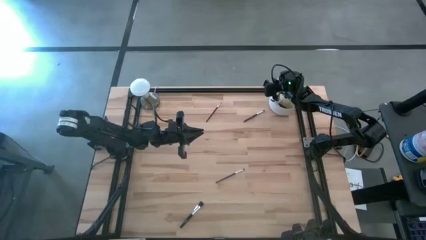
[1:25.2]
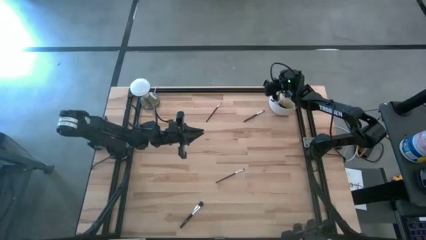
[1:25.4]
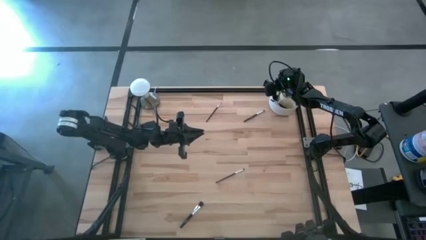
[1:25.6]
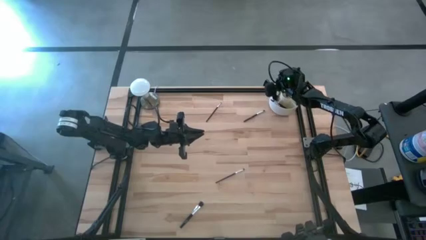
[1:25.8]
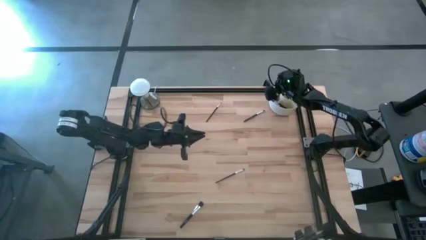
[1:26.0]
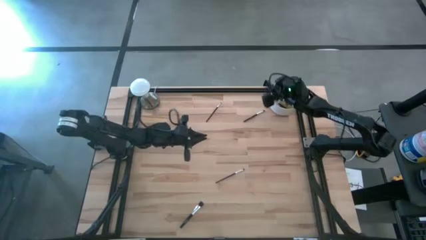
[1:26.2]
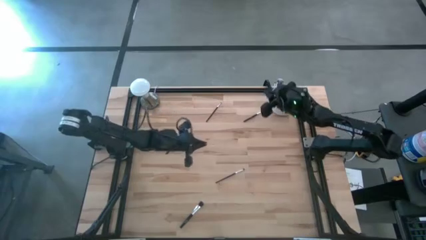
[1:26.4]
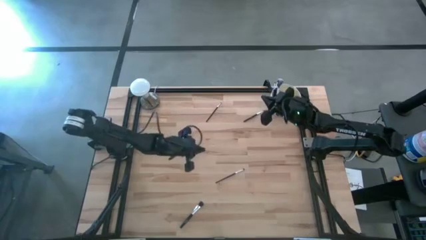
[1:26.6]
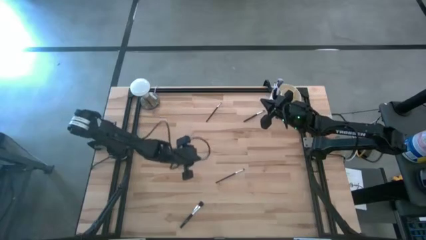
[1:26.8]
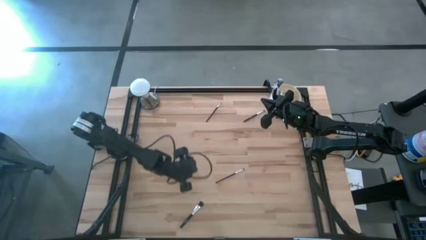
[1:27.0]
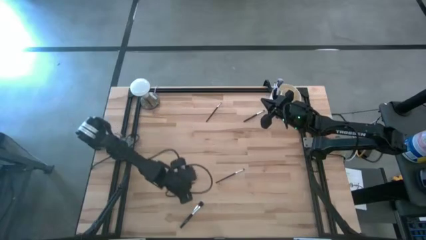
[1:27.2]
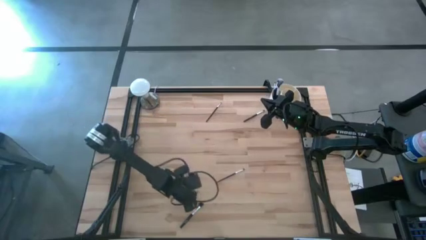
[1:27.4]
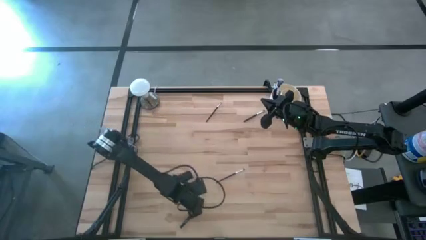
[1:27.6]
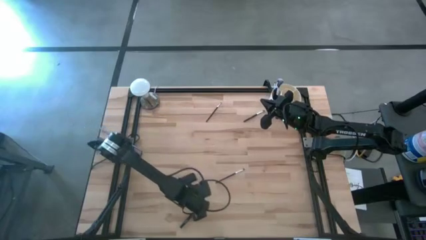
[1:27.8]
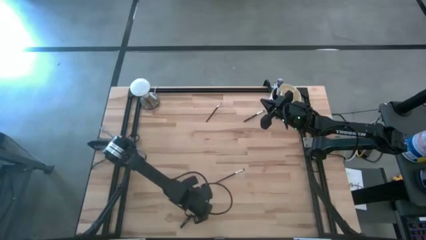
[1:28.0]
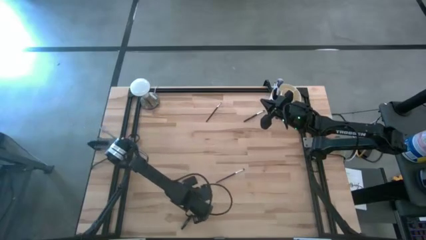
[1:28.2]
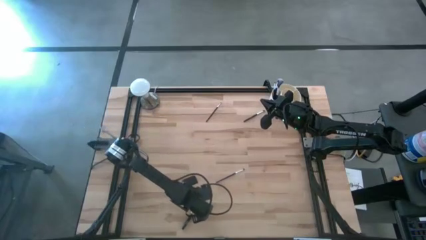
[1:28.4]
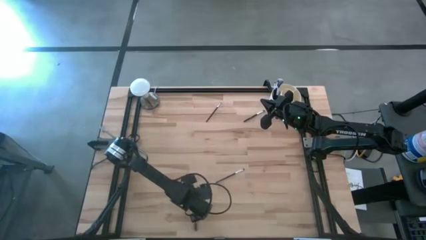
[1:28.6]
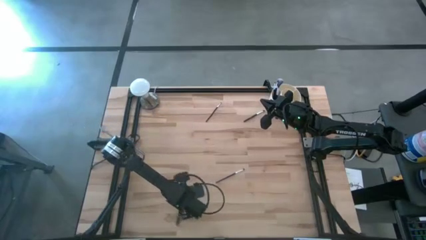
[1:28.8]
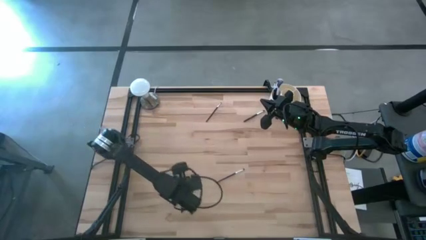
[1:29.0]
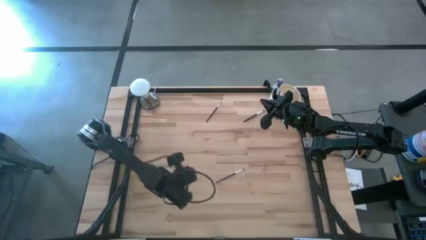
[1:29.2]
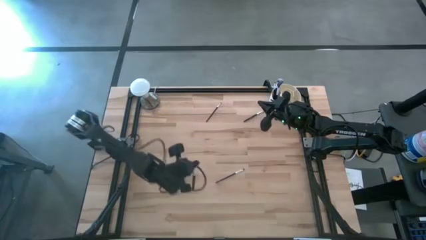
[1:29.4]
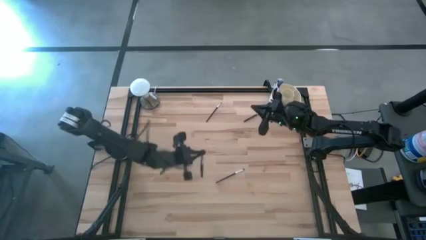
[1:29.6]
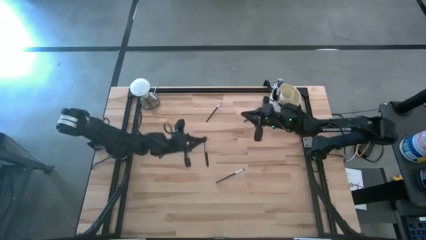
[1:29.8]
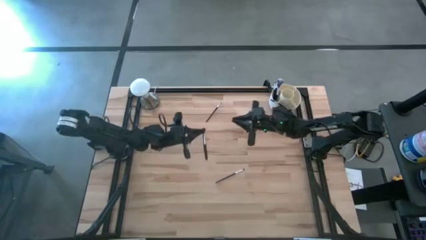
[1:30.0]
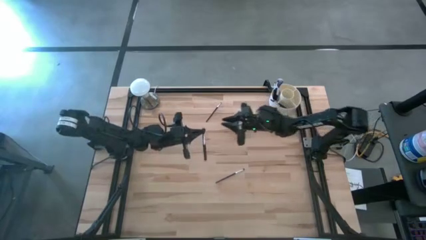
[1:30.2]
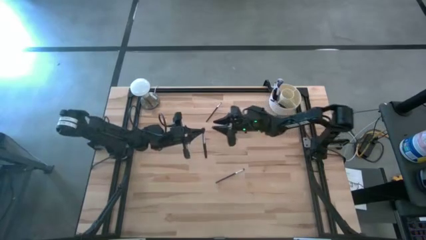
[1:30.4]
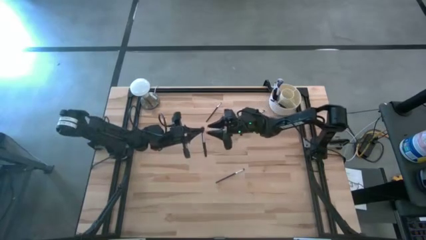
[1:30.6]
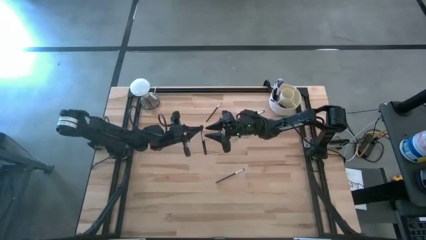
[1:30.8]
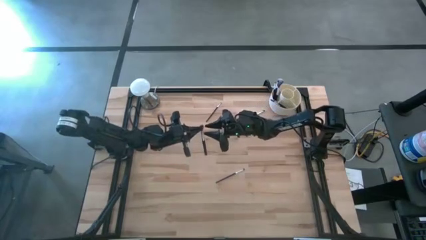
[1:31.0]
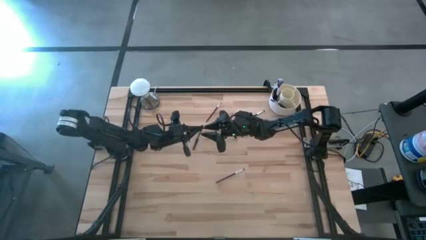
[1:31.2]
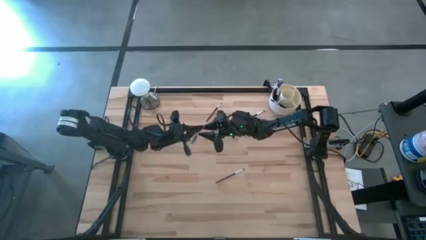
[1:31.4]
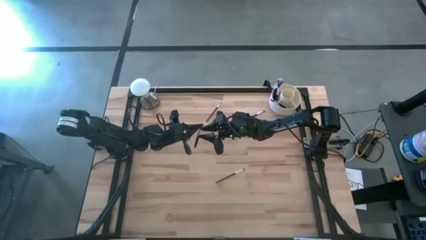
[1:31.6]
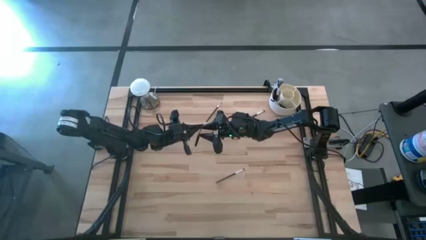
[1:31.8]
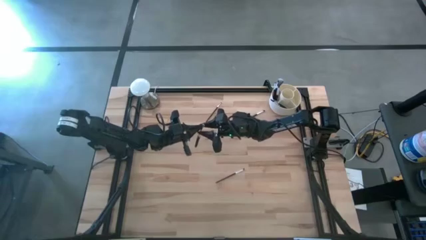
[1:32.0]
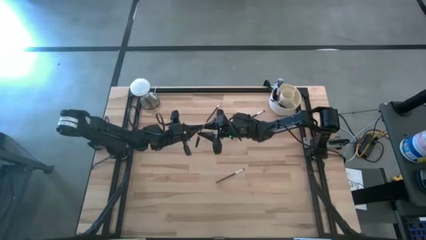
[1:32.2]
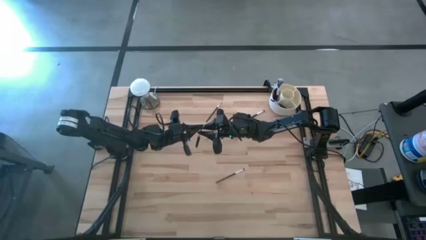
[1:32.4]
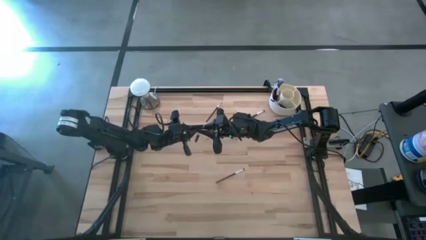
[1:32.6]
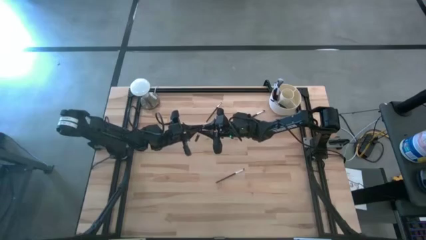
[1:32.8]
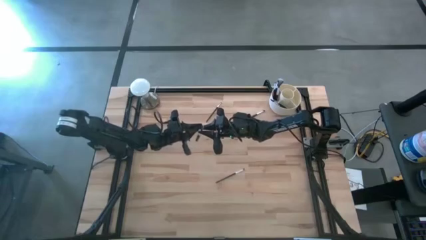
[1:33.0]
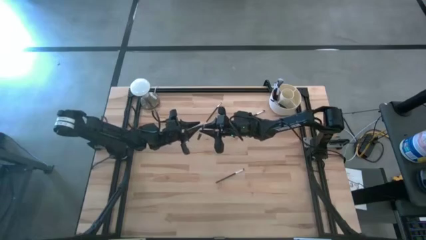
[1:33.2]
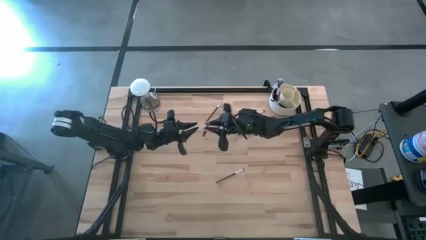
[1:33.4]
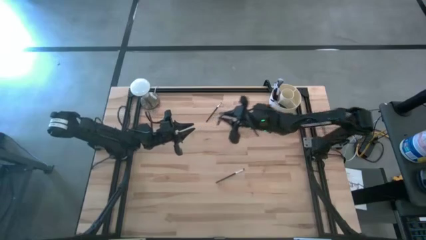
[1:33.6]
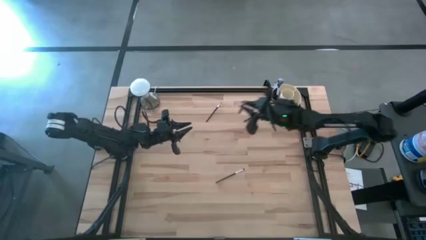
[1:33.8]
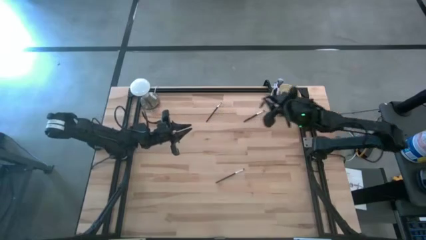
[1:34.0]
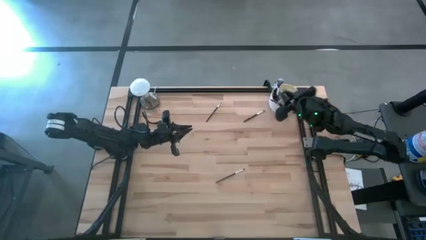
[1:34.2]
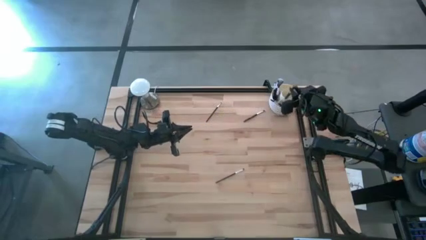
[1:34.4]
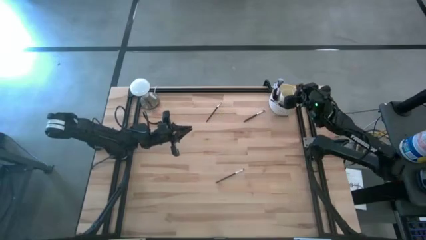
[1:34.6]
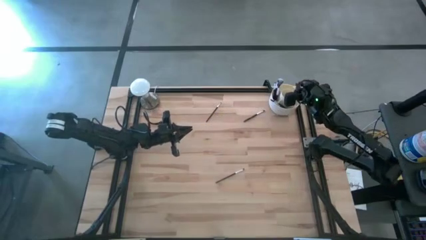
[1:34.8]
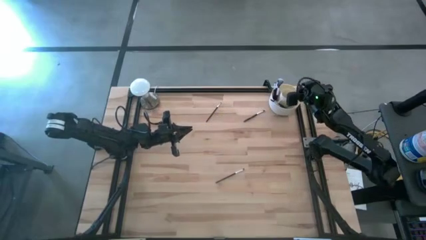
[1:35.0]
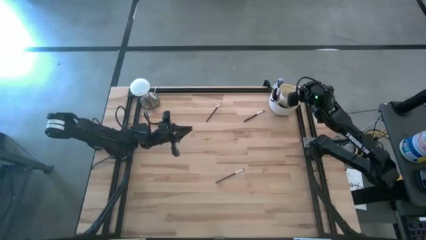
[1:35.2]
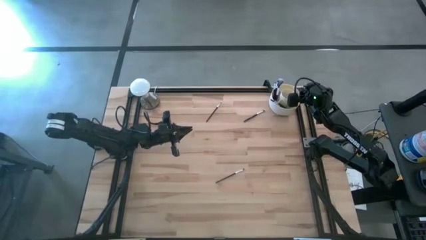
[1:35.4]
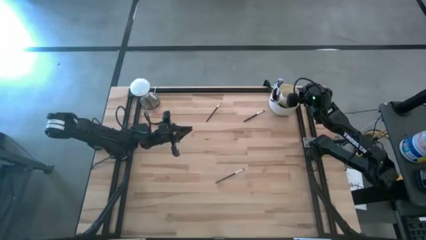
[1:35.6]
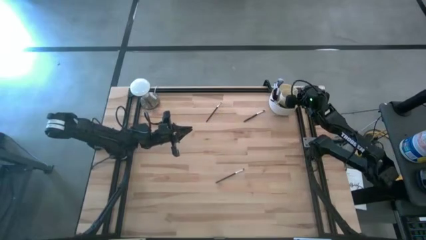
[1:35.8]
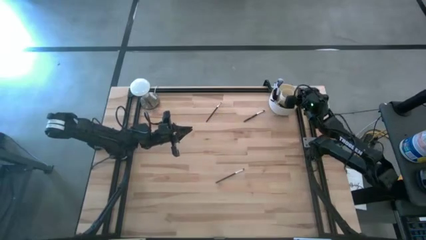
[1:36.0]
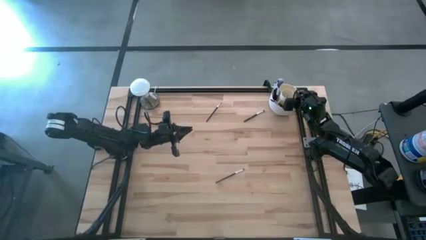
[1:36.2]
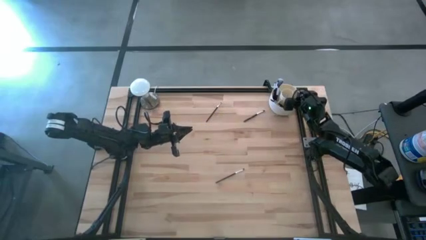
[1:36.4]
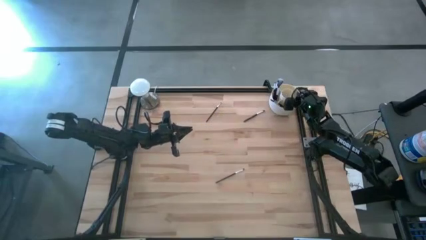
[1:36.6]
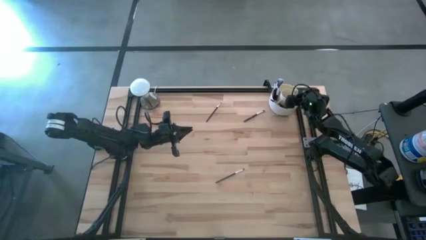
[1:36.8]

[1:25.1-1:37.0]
Task: Put items in baskets/containers
Put the black powder brush into the white organizer

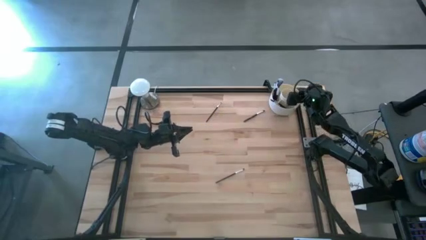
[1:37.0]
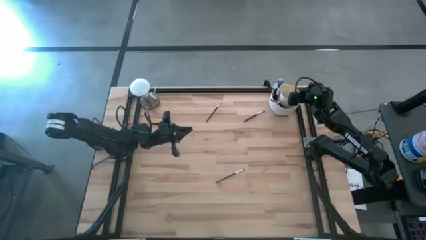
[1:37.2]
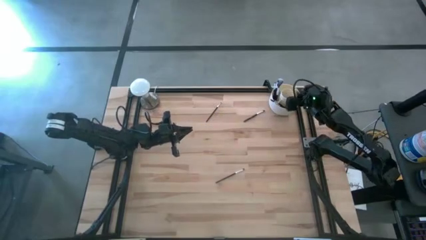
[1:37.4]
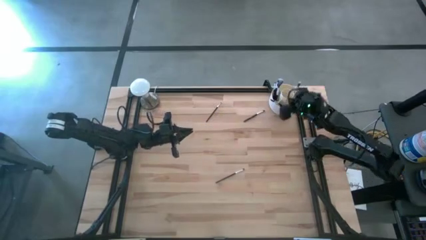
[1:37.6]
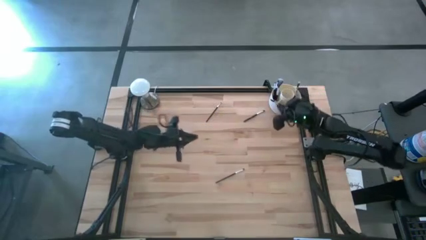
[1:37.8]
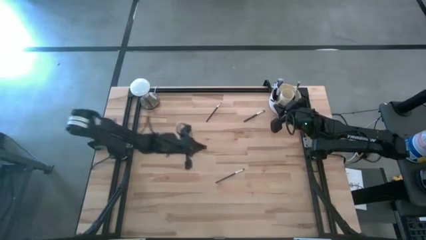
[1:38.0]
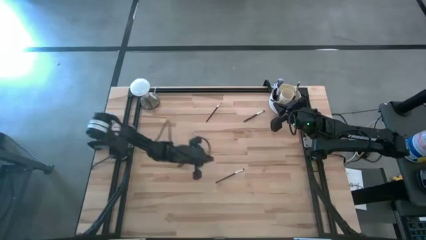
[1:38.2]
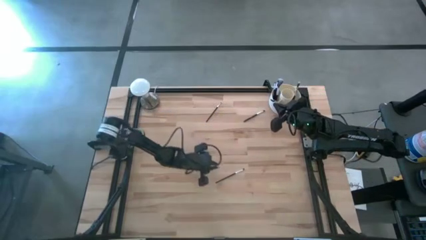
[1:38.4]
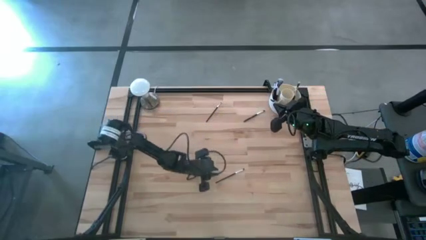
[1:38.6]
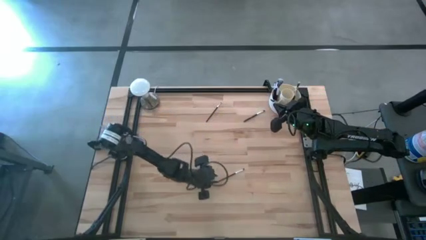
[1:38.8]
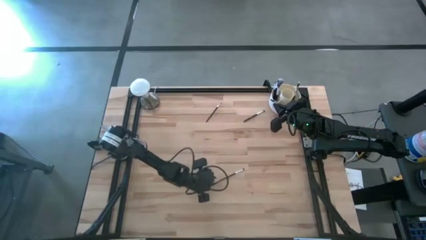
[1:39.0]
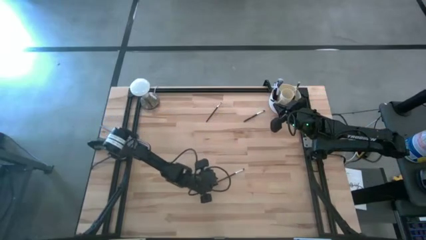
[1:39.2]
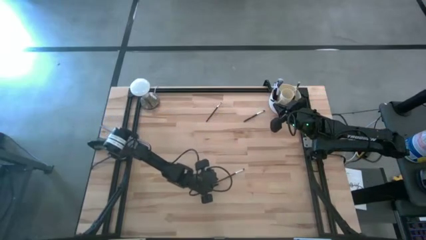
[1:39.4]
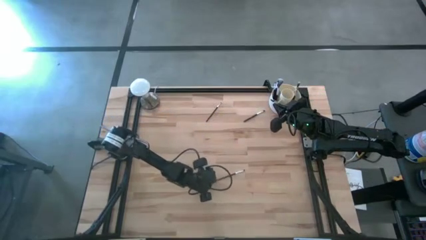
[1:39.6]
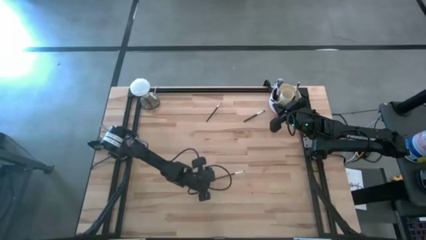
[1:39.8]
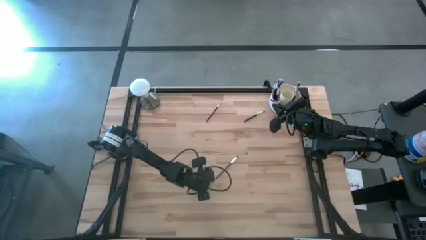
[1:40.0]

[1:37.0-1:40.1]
Put the black eyeshadow brush into the white organizer

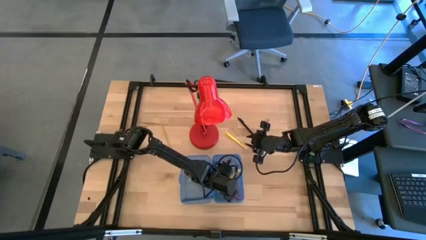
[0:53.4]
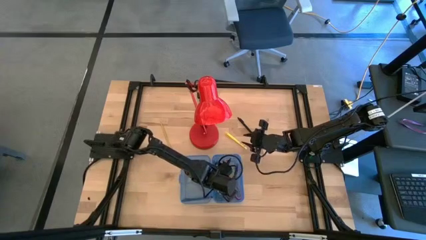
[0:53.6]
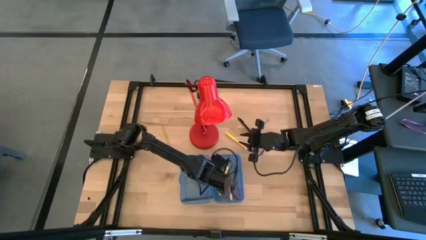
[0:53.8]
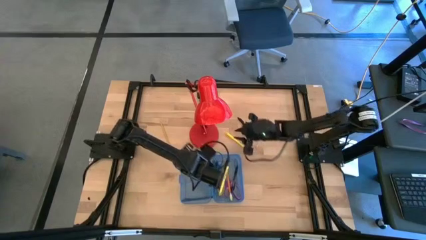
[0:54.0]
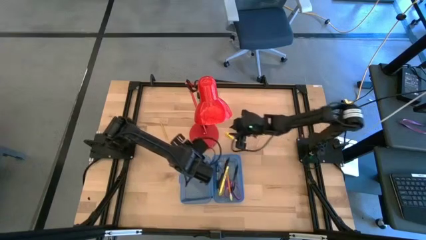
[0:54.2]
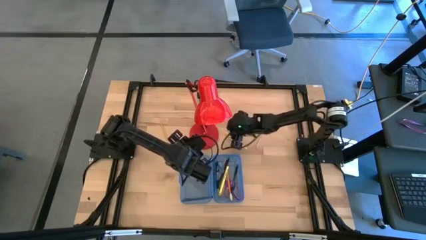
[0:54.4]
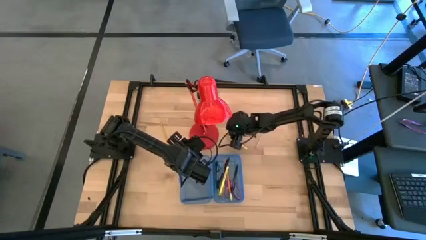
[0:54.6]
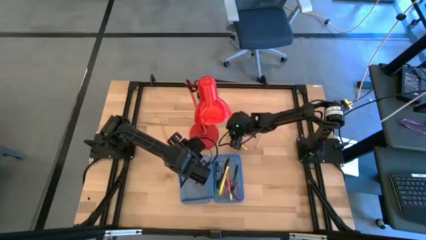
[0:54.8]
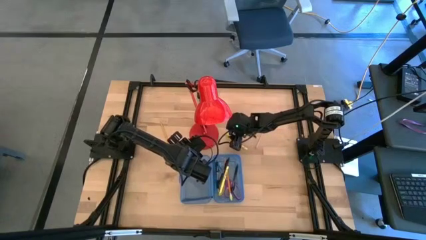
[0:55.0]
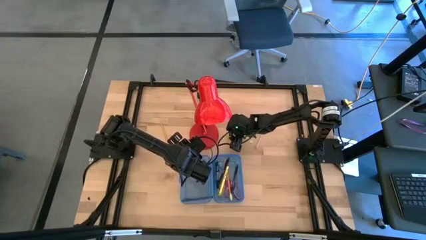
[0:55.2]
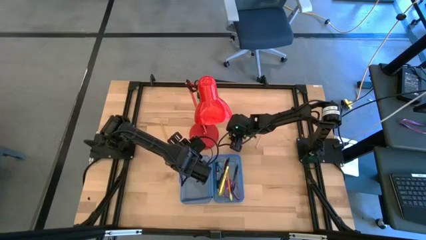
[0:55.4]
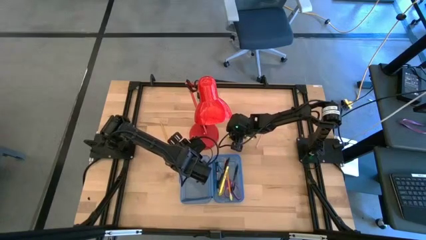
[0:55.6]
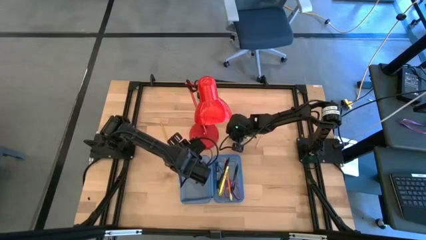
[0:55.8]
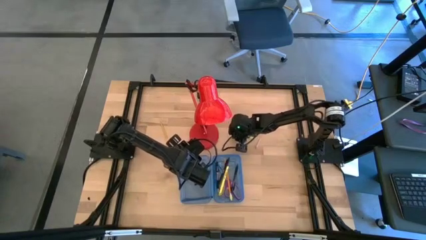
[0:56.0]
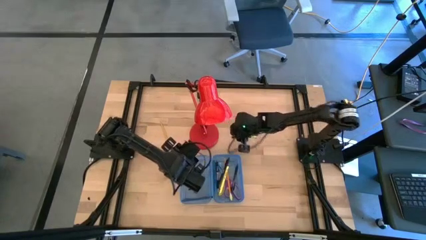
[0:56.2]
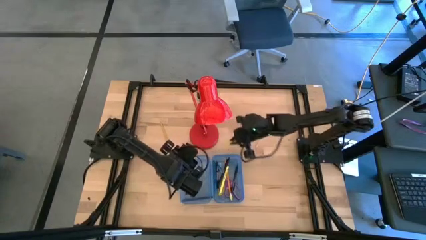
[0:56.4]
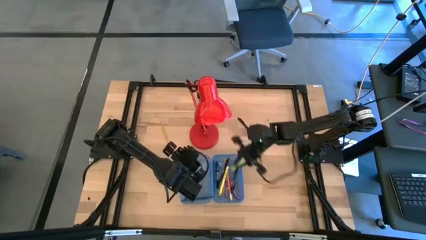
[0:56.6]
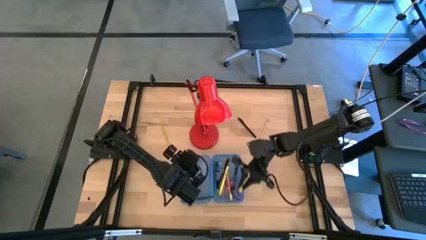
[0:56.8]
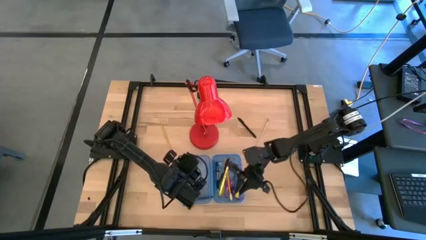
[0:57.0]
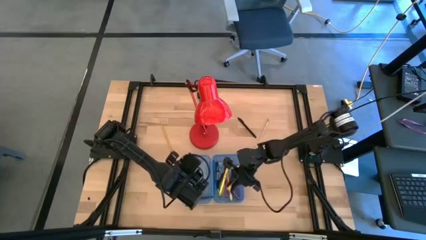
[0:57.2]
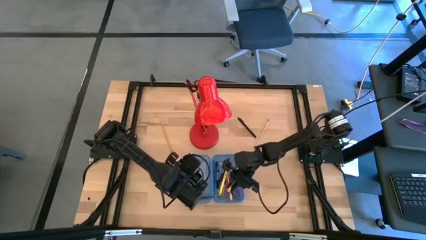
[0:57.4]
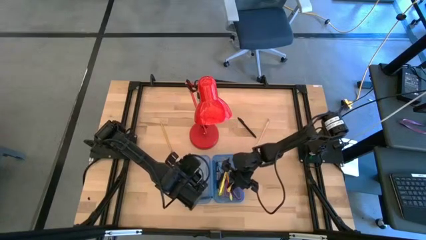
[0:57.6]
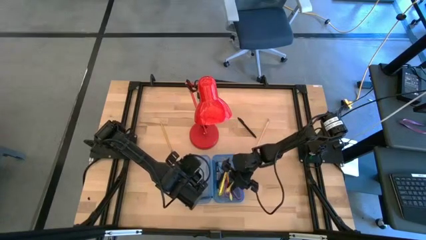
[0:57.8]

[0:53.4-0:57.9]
Task: Pick & place school supplies into a supply box
Put the yellow pen into the blue supply box
